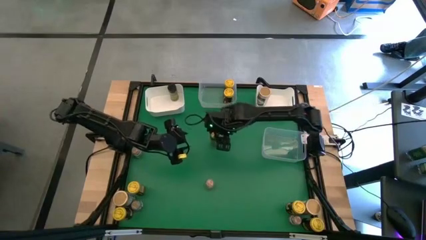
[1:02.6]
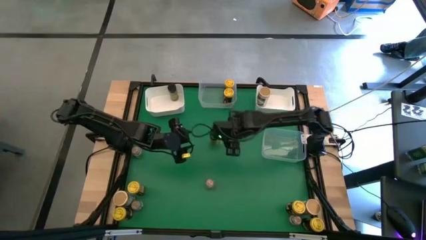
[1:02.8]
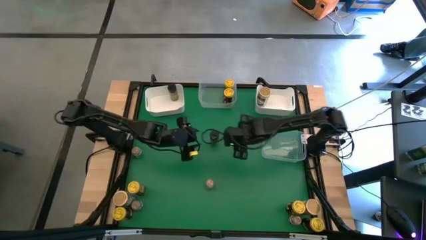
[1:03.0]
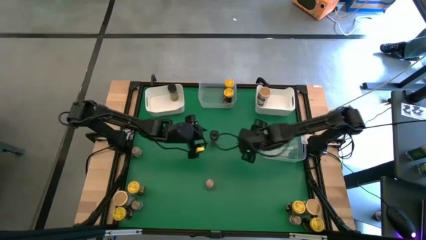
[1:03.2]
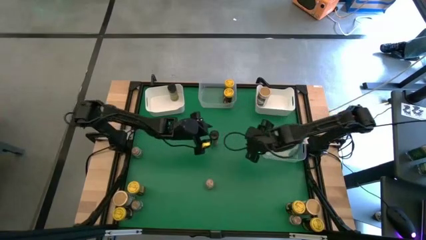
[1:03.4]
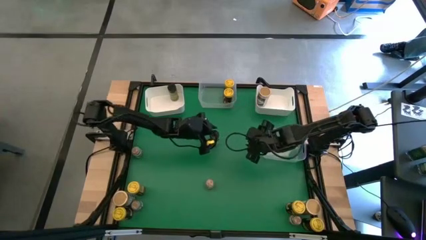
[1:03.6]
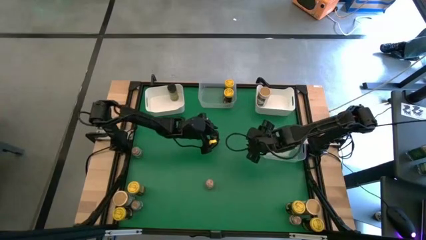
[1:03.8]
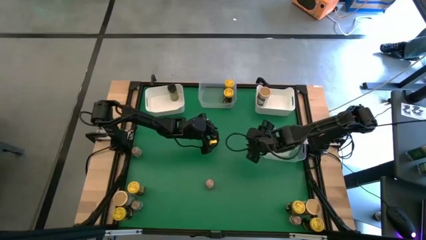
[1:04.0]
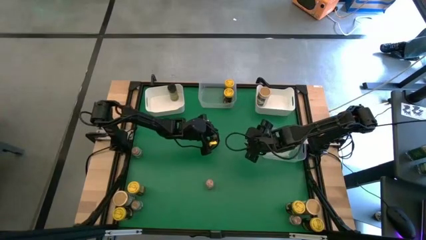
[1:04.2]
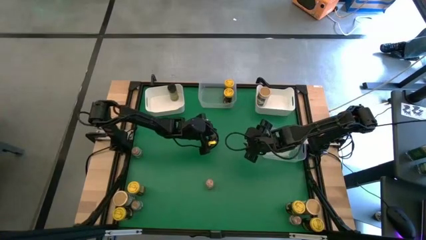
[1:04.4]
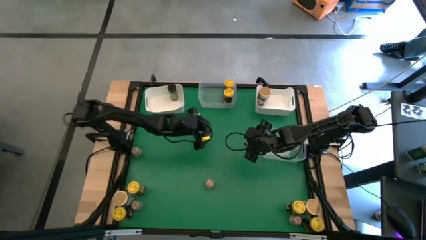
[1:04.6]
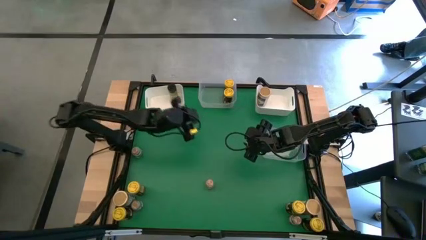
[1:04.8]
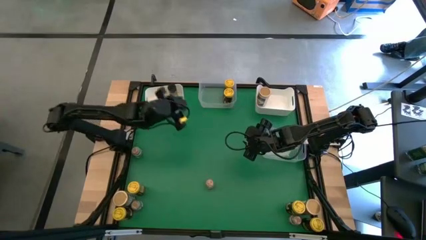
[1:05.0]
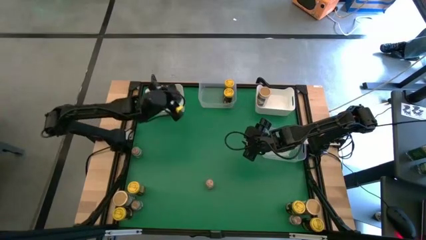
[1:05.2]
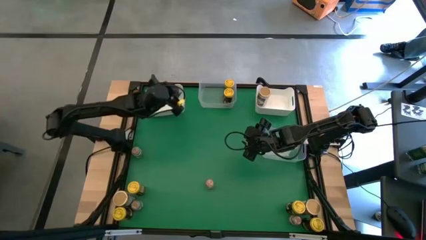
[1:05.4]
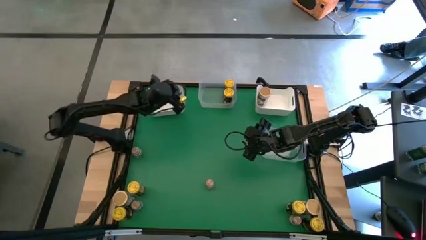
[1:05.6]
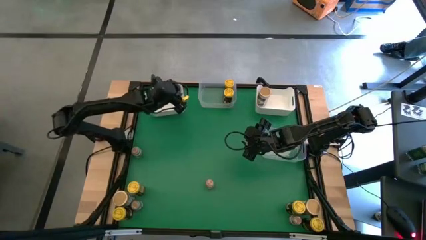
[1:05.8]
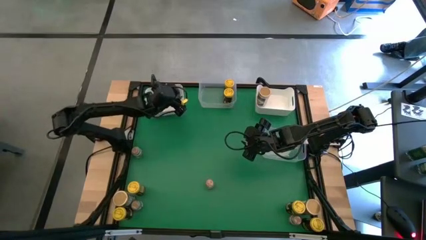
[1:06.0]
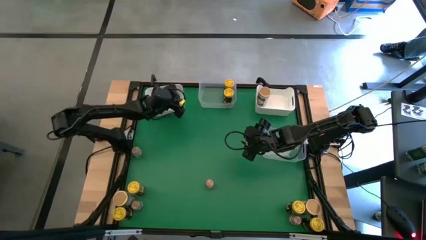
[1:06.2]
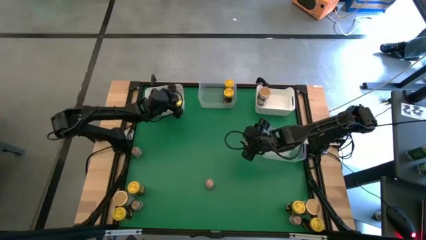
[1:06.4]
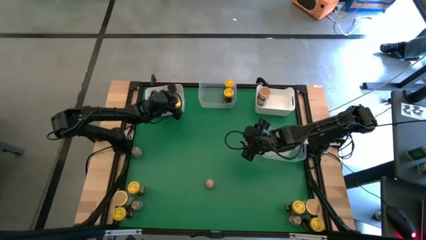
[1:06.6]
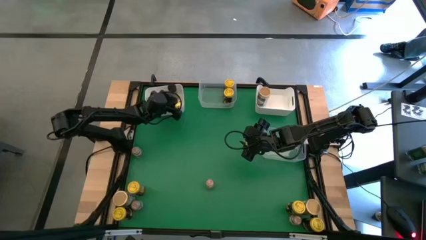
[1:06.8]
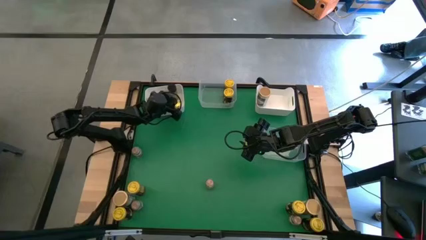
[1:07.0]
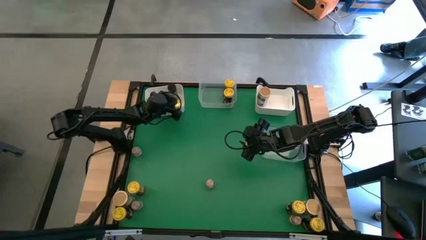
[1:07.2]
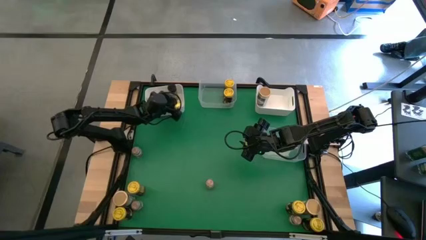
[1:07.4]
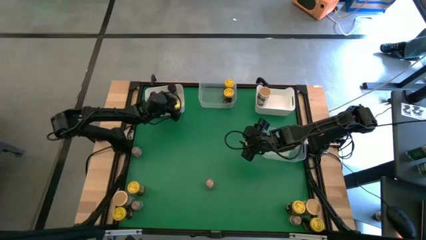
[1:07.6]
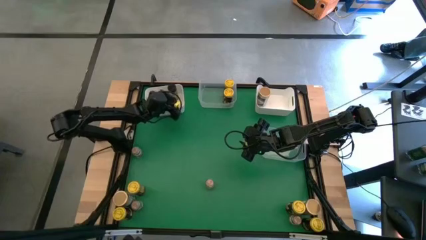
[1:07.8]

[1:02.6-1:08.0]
Task: Sort spices by type
Put the black seasoning bottle into the left white bin

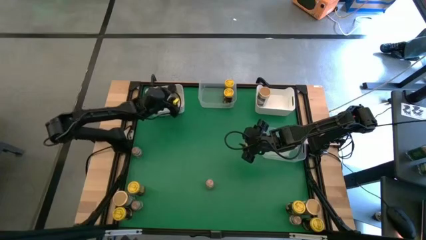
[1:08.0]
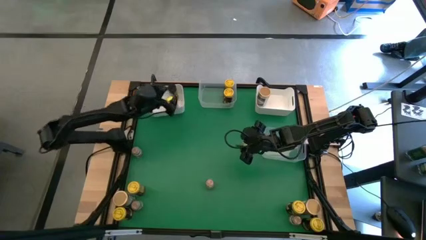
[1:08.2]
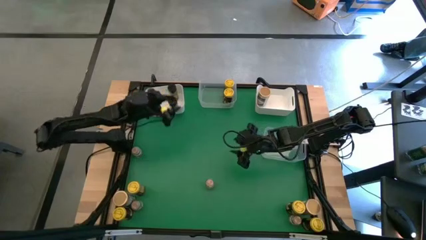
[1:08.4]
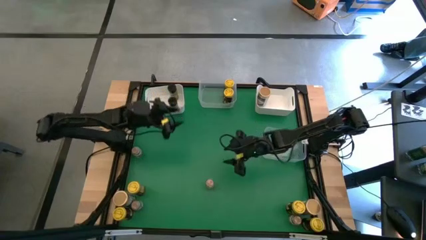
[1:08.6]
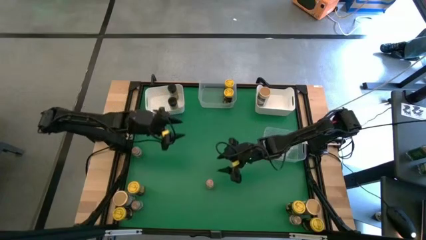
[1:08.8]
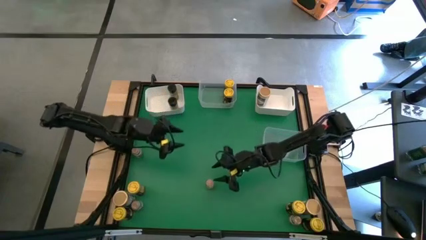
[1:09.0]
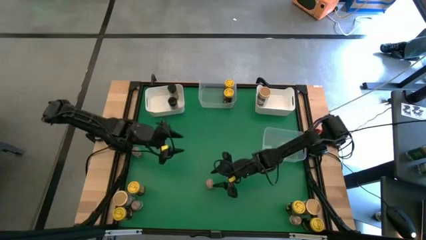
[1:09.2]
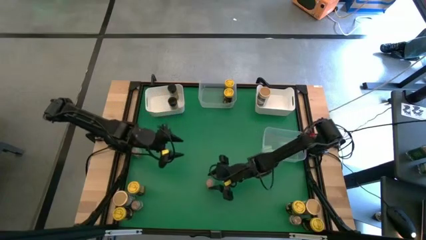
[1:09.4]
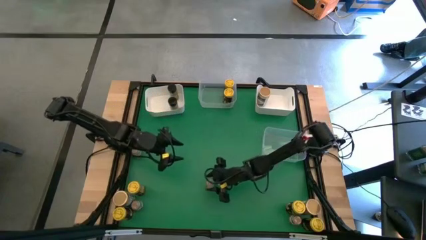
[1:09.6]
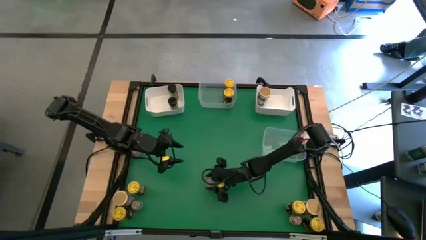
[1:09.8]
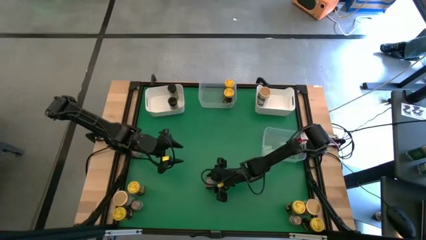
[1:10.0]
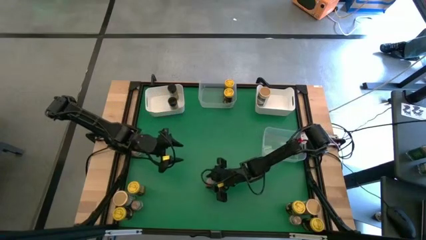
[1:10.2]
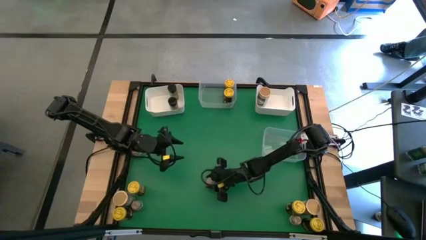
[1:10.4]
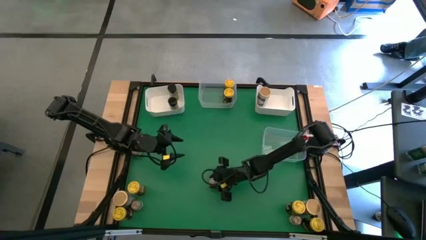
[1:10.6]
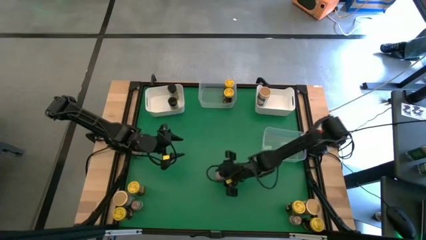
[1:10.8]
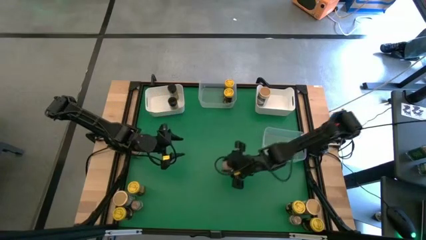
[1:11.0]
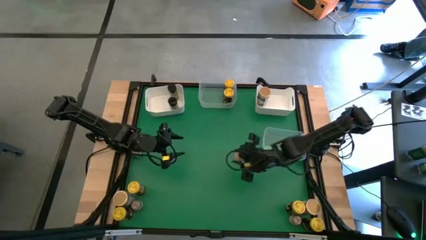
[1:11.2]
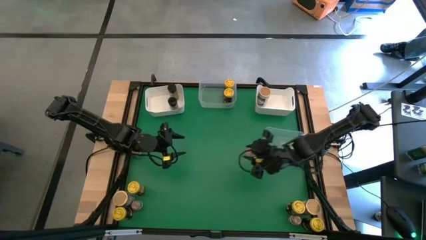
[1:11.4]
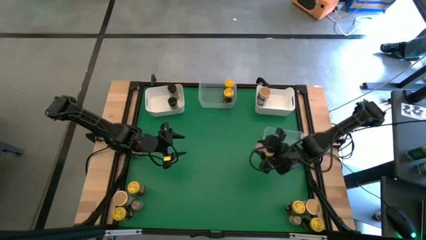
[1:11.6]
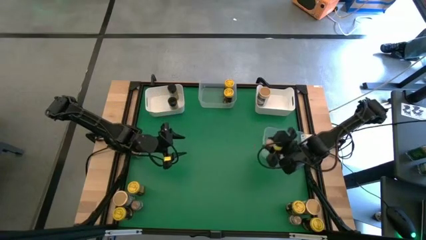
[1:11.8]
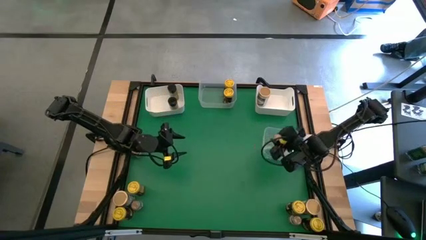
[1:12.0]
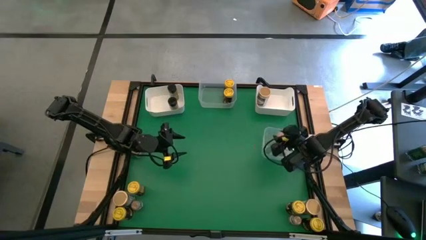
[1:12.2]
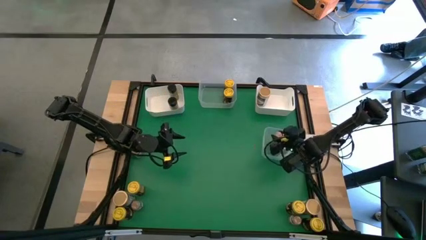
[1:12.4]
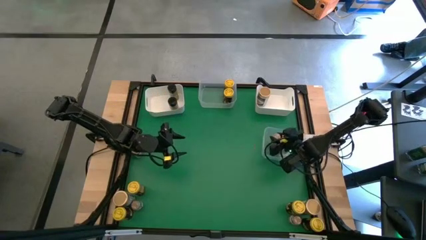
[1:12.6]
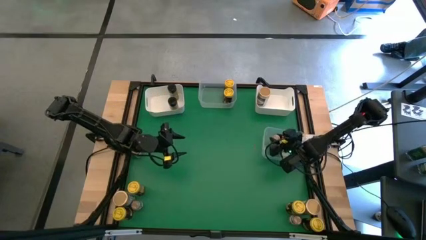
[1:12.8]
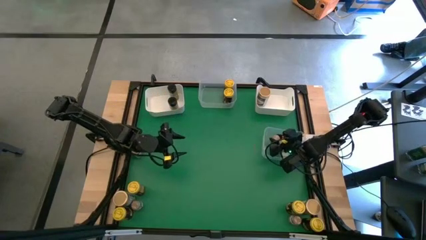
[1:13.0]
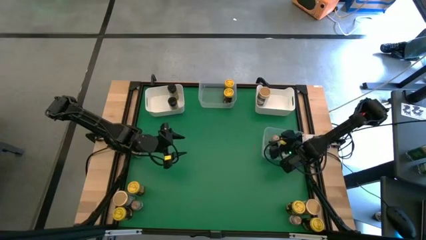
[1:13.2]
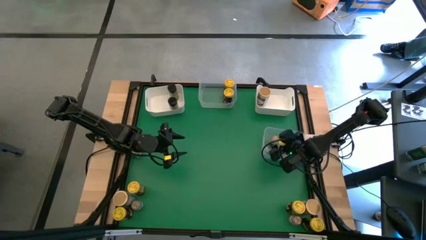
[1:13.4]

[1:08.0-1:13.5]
Put the transparent seasoning bottle into the bottom transparent bin
